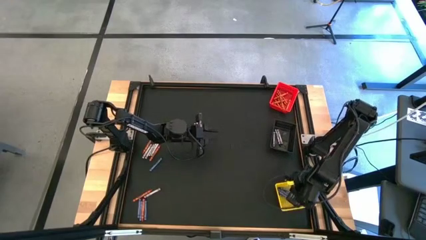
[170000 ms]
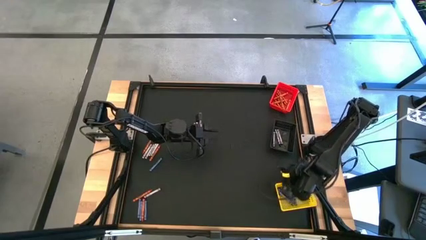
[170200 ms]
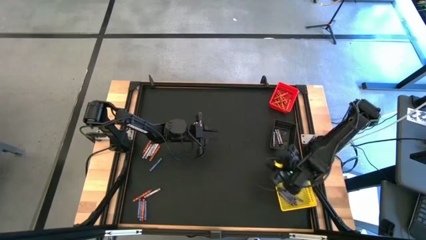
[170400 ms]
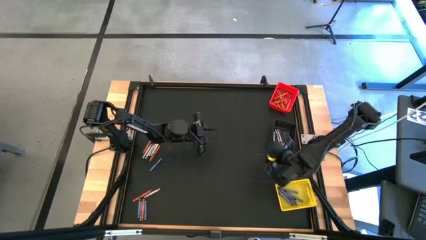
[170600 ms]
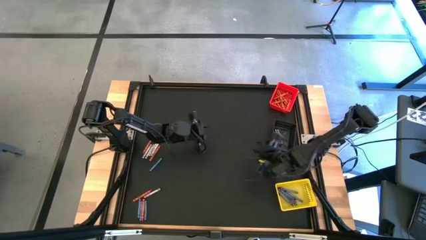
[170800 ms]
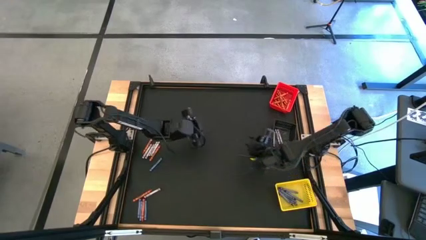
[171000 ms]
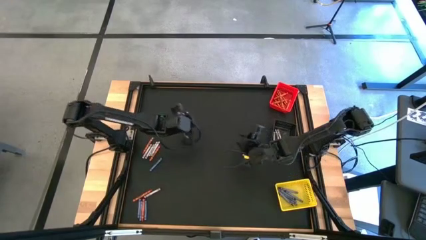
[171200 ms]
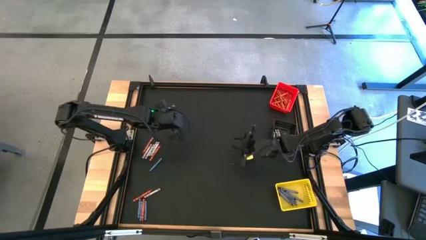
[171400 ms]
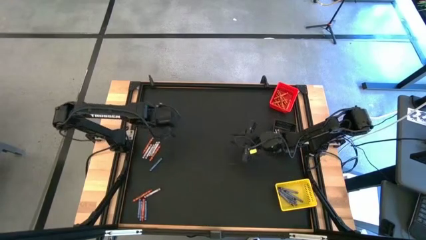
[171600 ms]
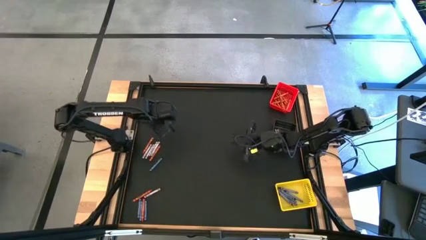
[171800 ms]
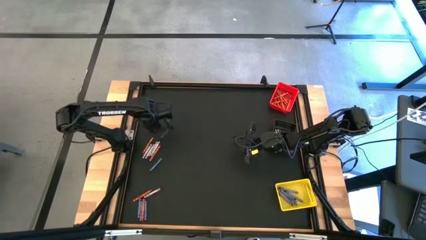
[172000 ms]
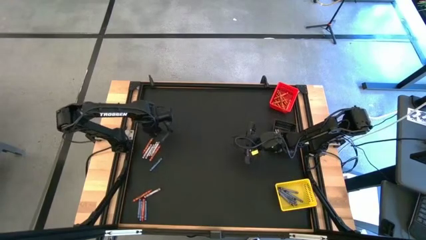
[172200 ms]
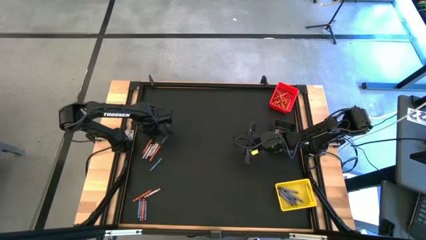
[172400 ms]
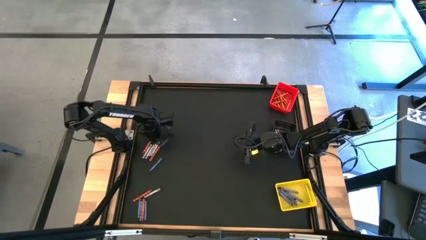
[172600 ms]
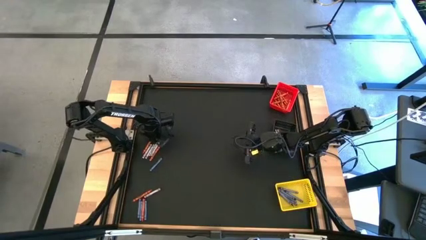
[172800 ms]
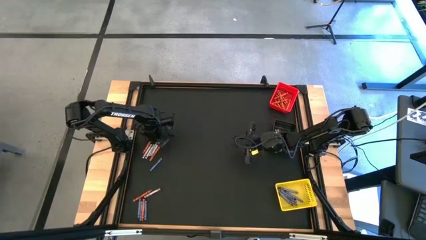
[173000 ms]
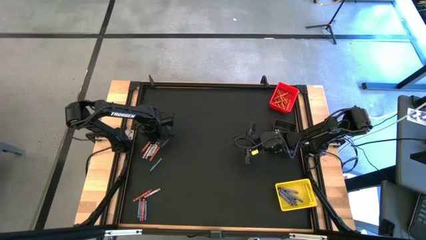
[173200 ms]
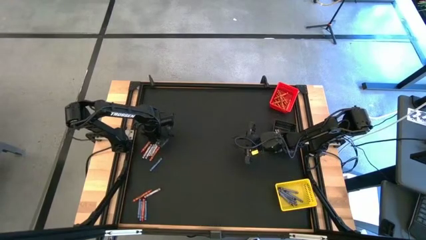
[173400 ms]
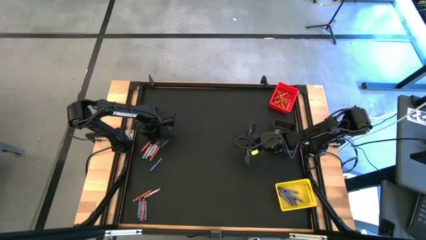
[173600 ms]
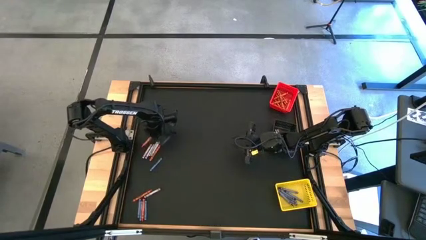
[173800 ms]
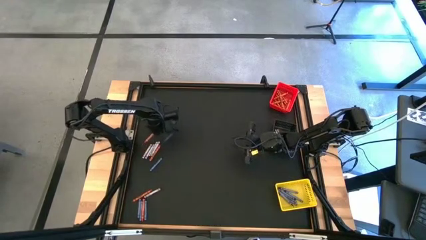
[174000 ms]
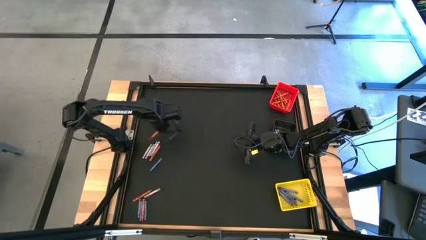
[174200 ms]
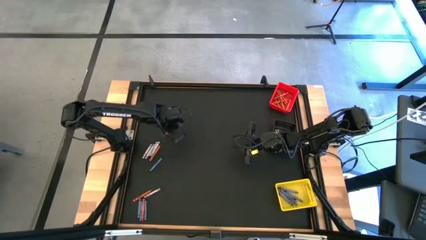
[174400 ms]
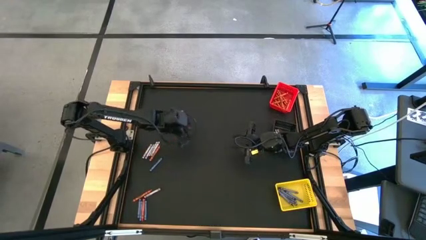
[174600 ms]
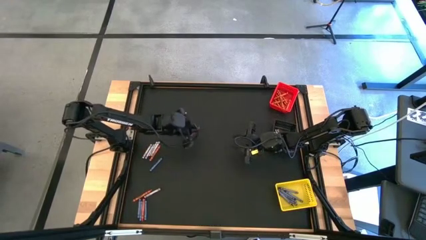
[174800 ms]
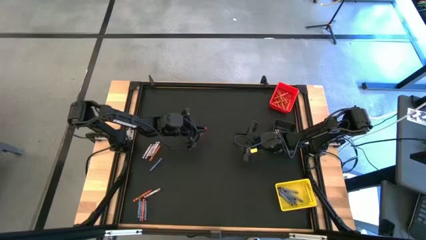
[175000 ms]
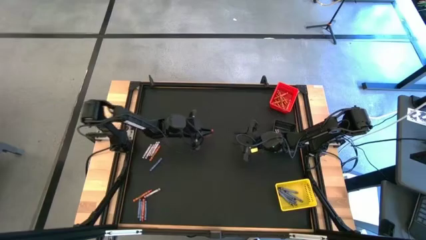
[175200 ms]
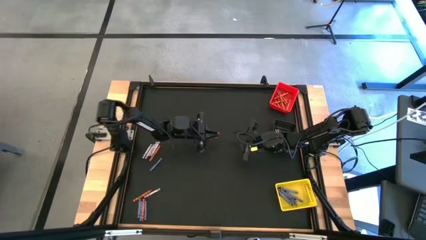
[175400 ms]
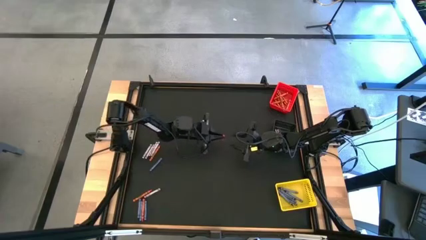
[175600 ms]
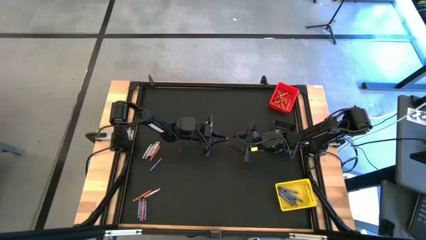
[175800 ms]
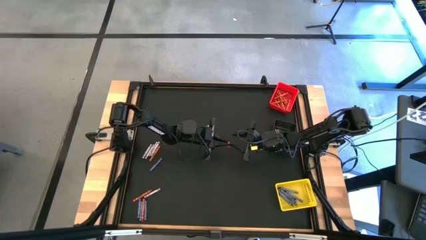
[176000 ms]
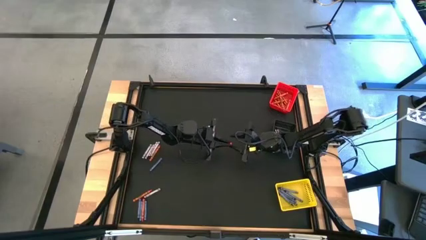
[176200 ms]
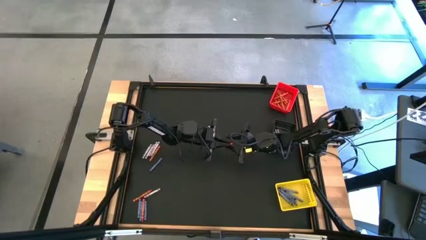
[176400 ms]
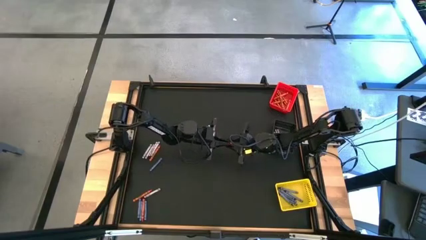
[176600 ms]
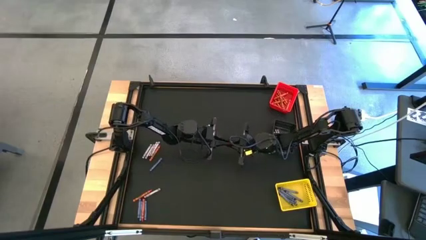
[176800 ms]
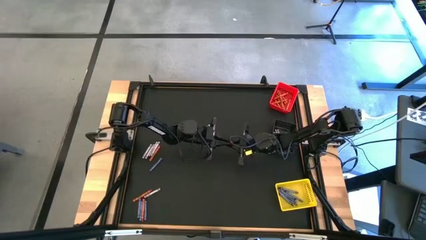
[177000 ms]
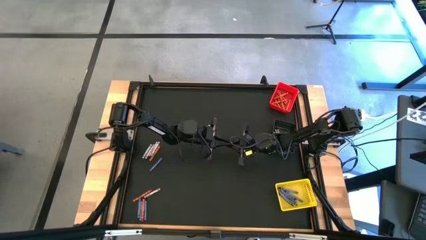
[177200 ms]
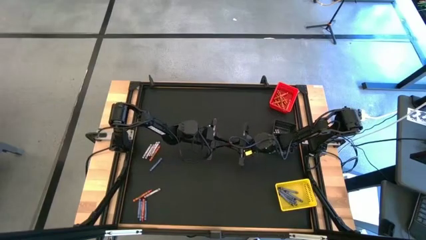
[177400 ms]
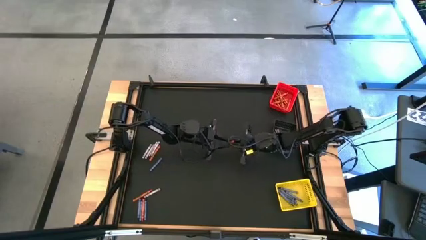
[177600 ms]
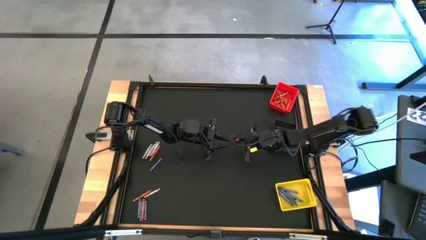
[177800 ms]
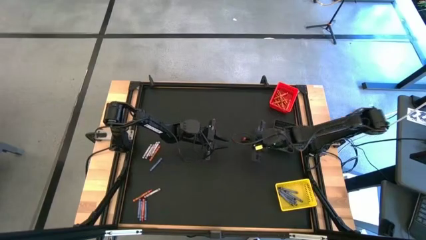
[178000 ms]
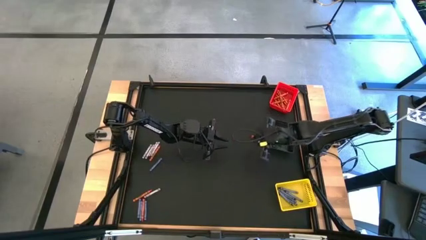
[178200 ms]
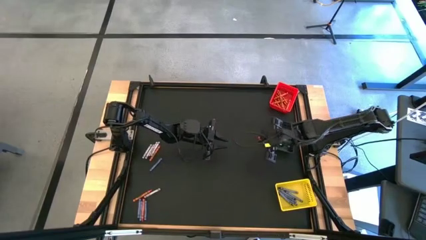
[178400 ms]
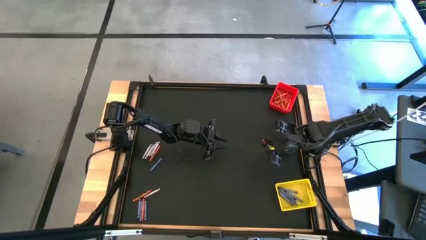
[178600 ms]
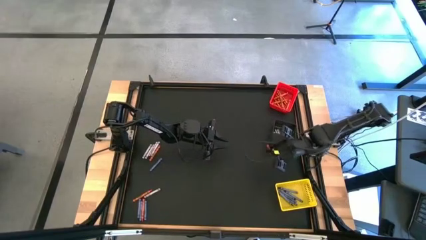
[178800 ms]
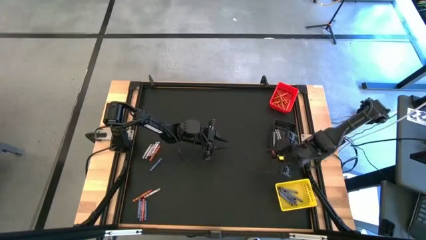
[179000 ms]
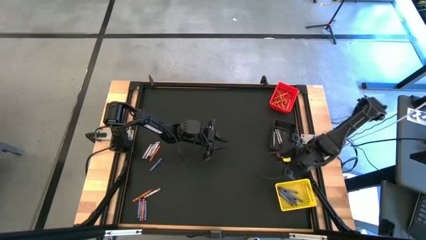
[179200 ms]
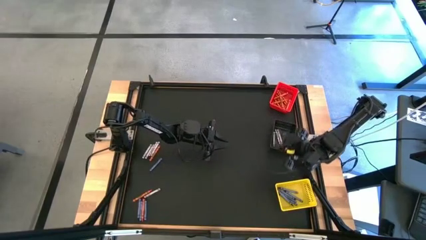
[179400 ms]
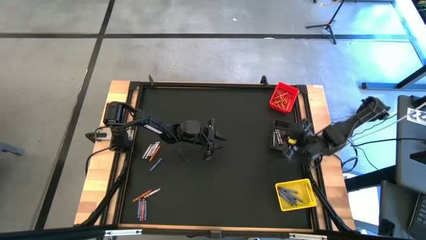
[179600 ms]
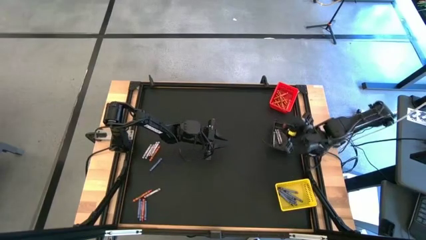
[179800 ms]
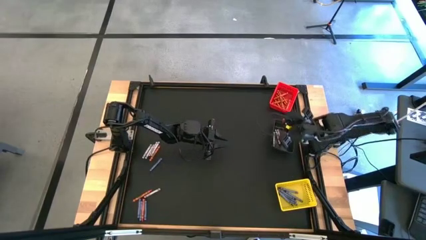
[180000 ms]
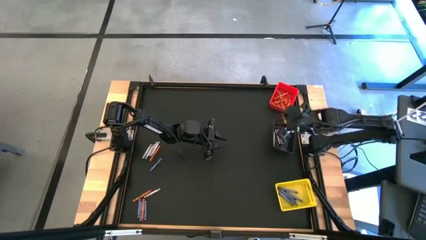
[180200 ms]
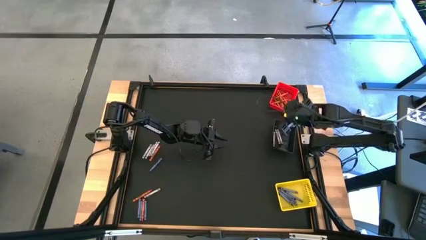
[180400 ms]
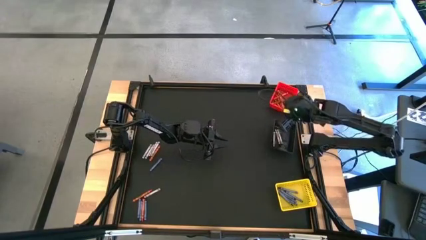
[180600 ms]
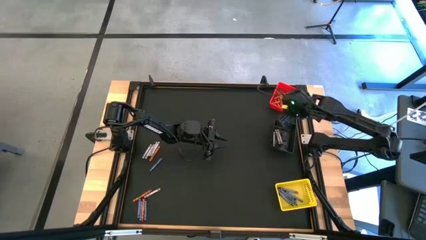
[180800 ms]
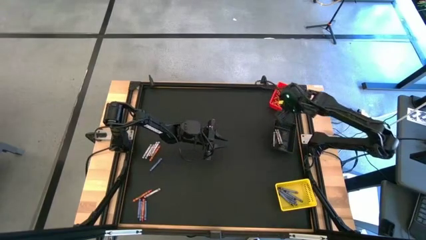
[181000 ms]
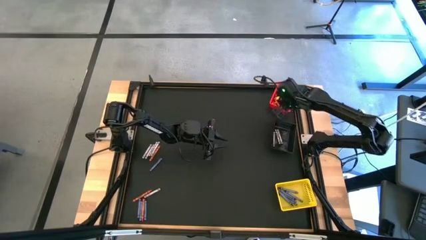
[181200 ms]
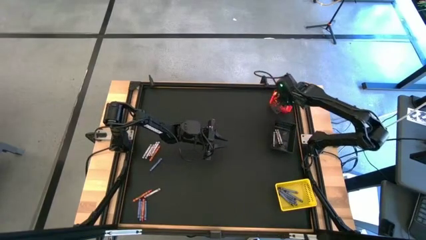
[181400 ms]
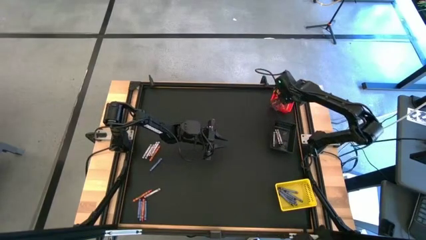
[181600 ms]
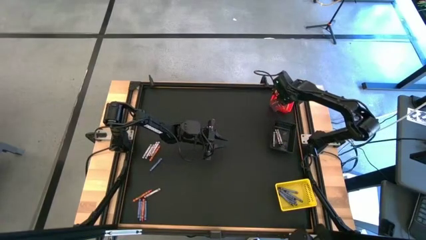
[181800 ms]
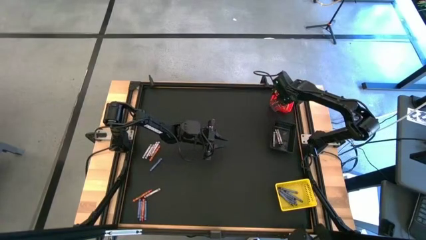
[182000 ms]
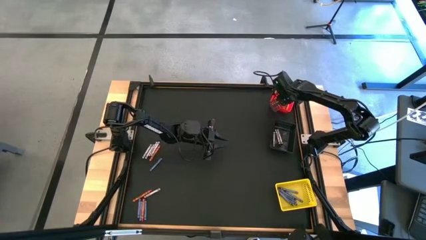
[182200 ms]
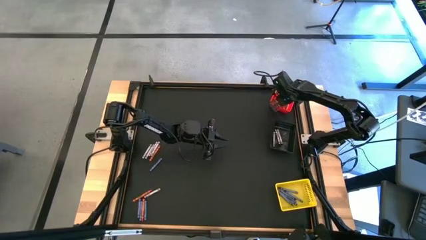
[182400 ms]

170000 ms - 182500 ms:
Task: Sort crayons
Put the orange crayon into the red bin

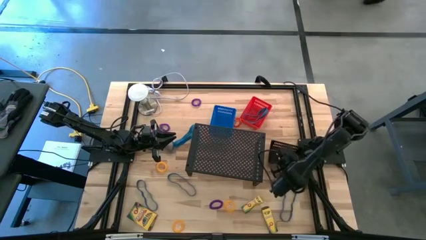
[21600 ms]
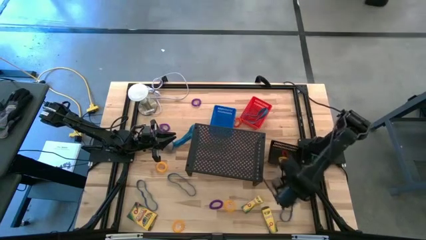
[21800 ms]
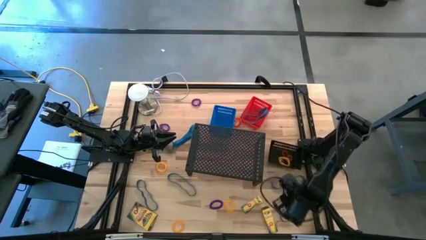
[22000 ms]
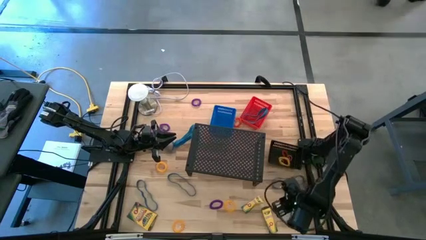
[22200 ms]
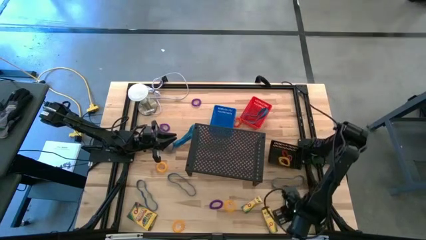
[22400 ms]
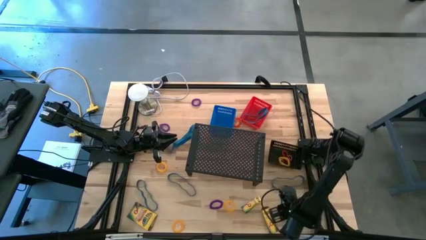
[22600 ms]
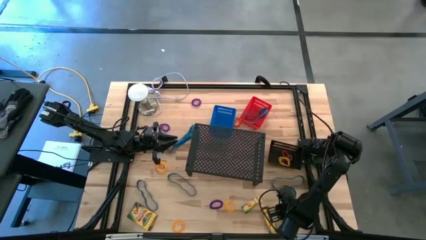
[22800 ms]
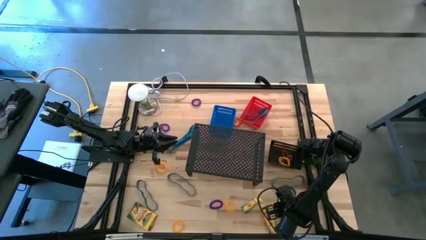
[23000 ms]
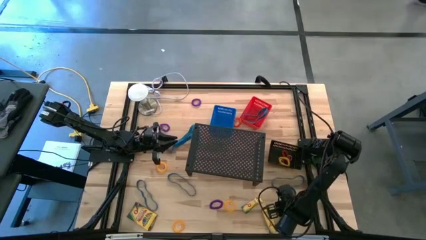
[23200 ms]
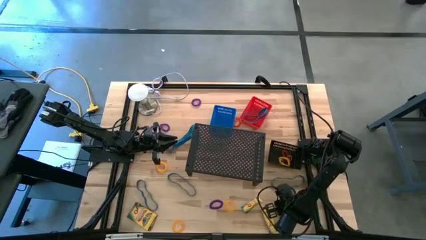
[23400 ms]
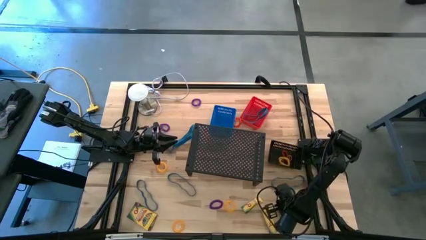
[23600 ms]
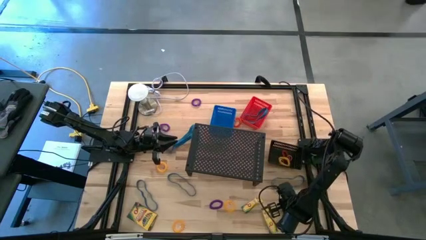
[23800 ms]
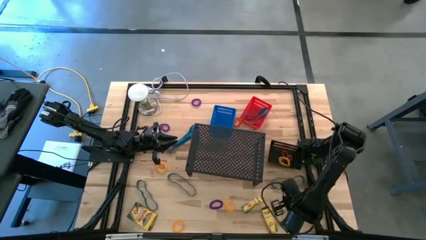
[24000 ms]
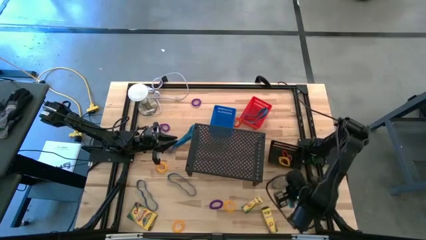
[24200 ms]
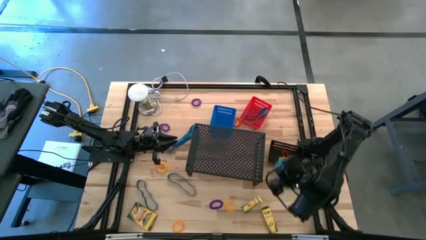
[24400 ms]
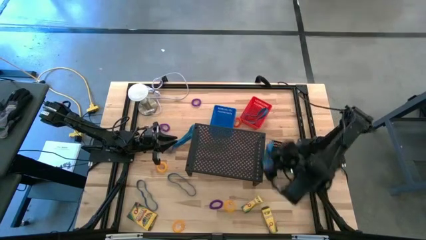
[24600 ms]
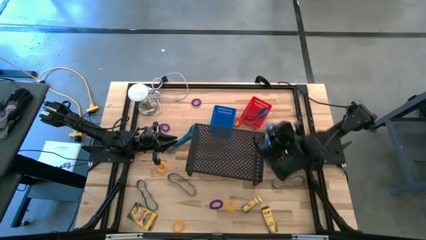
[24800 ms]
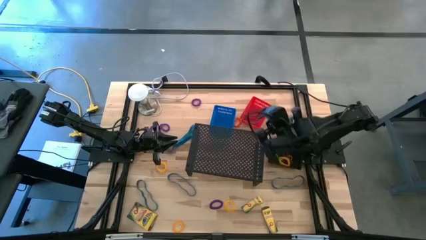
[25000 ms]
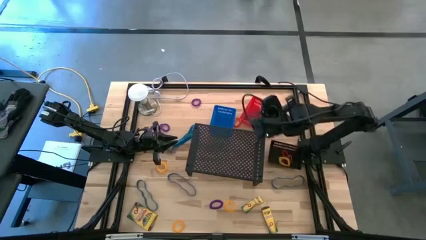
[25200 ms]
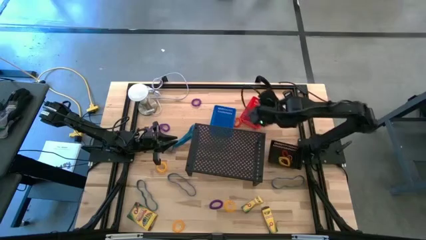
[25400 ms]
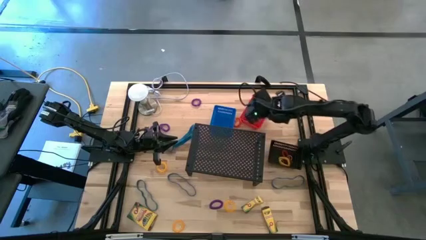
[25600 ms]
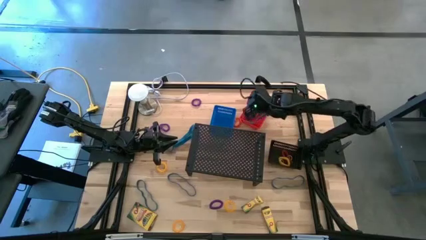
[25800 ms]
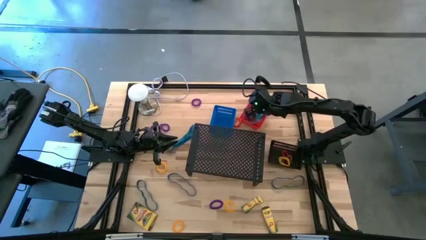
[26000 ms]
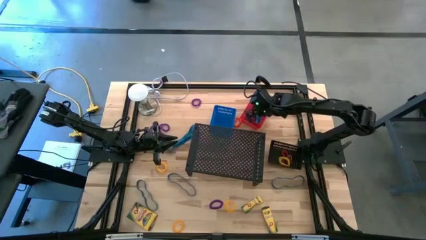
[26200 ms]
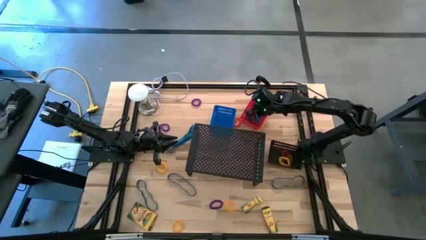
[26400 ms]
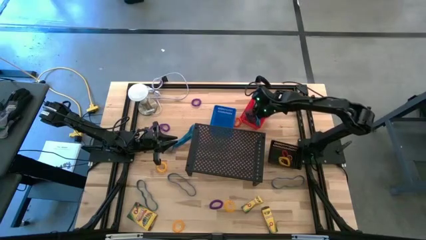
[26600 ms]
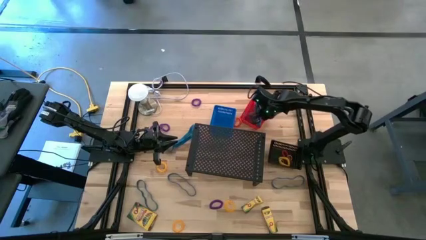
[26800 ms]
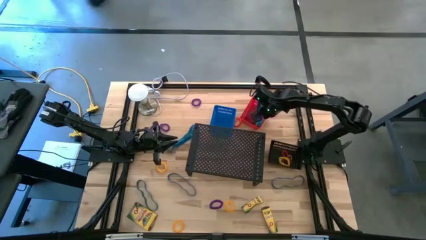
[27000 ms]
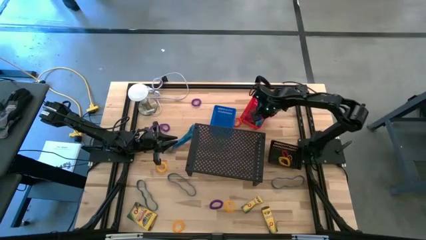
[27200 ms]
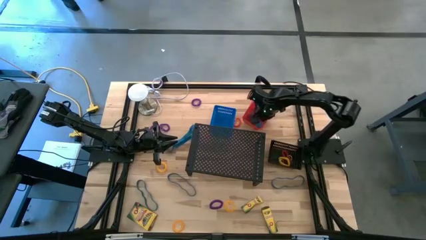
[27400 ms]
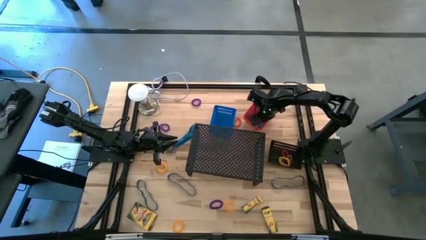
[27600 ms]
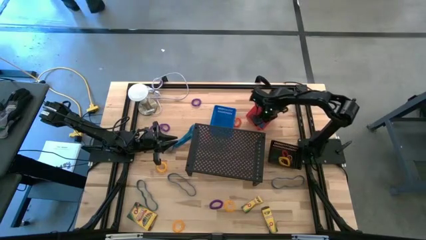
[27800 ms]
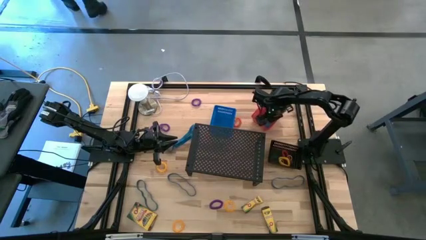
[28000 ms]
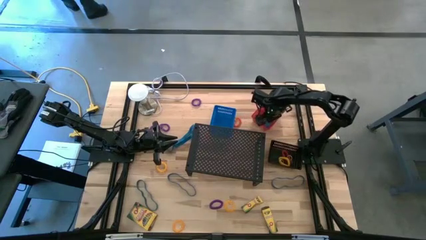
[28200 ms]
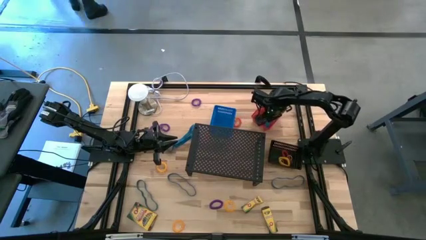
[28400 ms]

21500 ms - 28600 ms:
Task: Pick & Place Office Desk Supplies
Put the blue rubber band into the red bin
